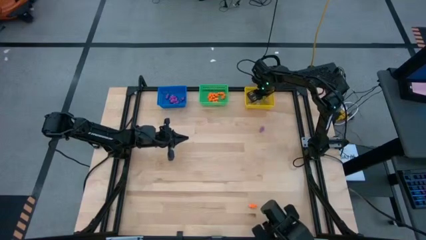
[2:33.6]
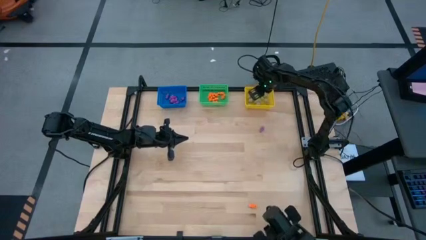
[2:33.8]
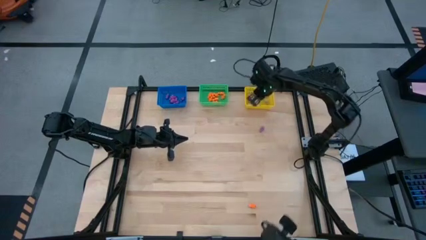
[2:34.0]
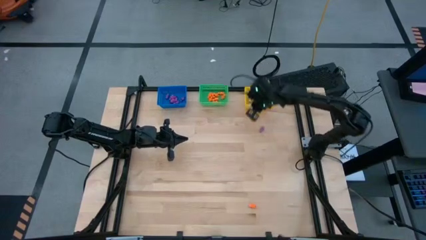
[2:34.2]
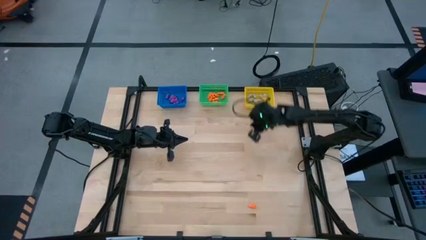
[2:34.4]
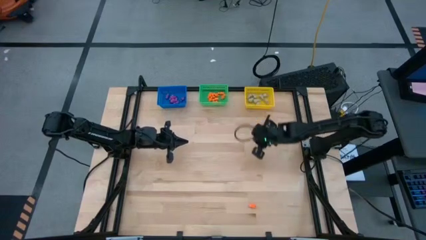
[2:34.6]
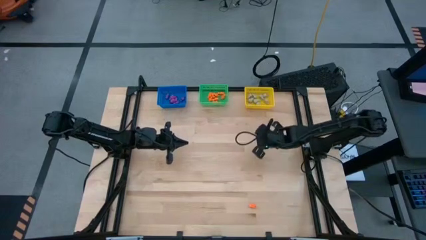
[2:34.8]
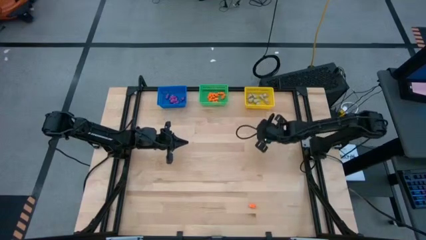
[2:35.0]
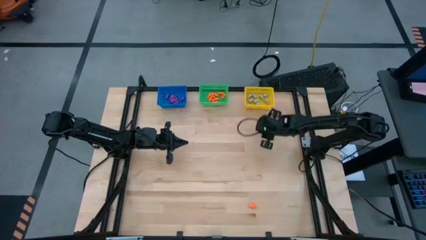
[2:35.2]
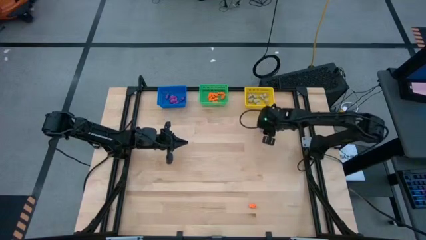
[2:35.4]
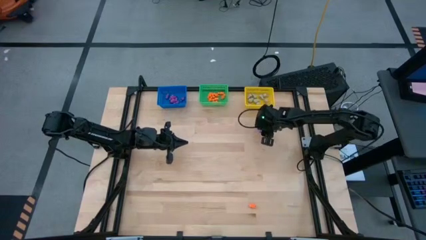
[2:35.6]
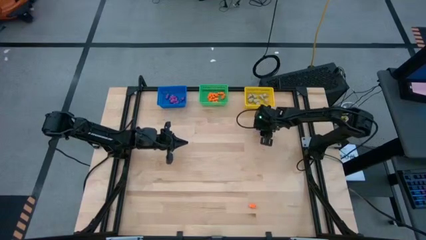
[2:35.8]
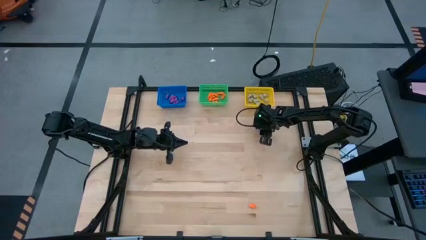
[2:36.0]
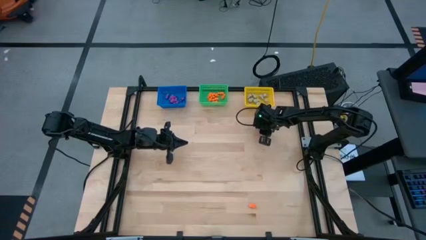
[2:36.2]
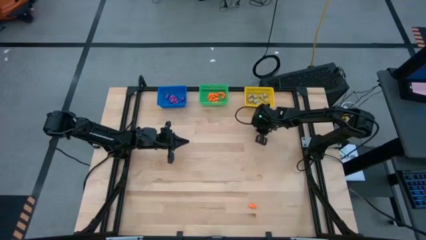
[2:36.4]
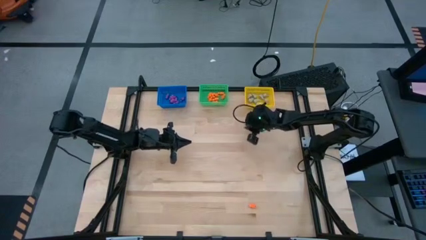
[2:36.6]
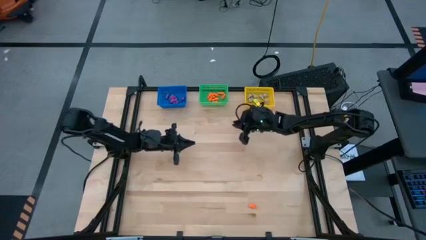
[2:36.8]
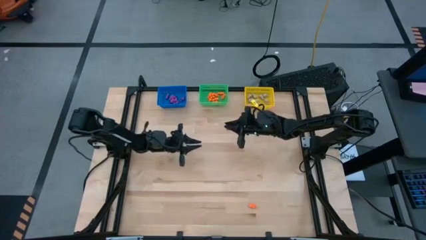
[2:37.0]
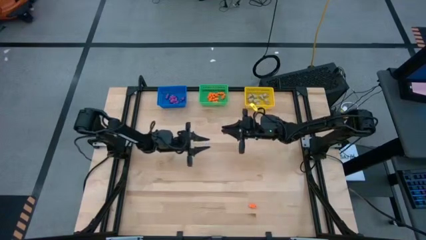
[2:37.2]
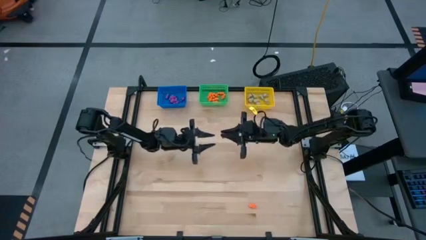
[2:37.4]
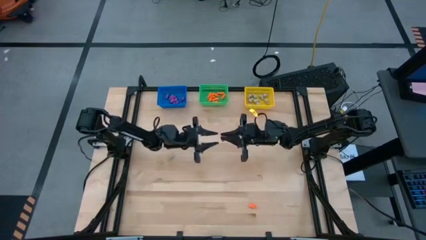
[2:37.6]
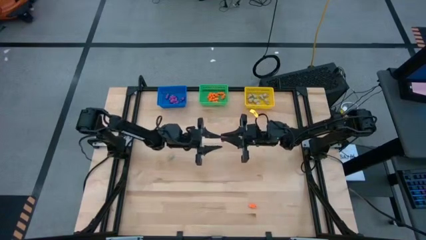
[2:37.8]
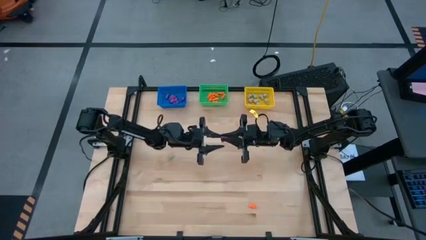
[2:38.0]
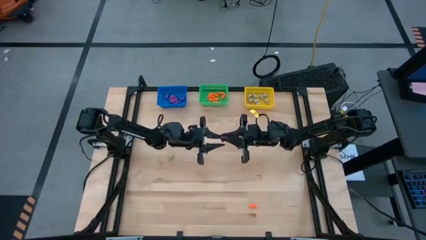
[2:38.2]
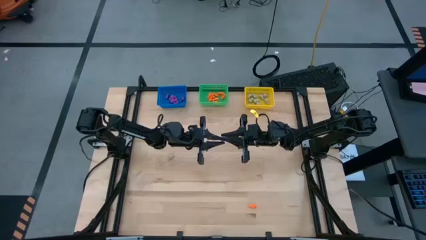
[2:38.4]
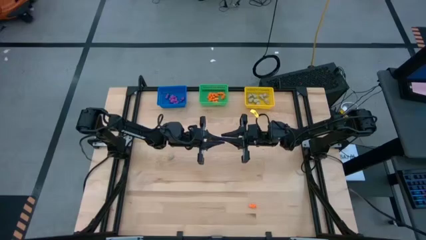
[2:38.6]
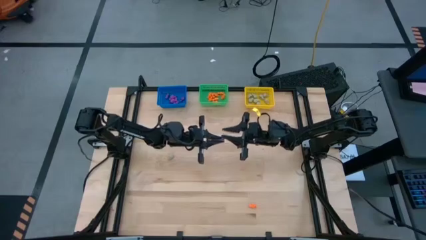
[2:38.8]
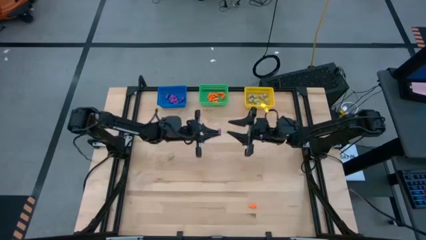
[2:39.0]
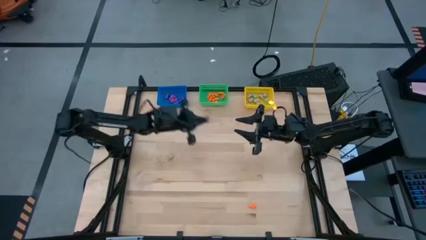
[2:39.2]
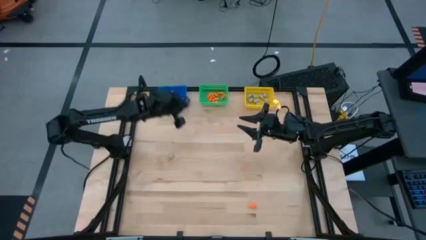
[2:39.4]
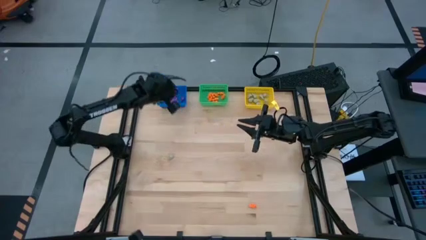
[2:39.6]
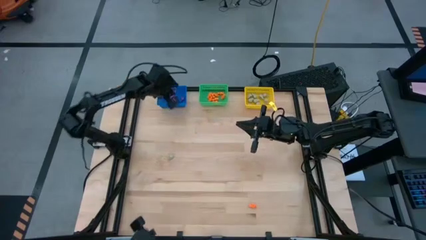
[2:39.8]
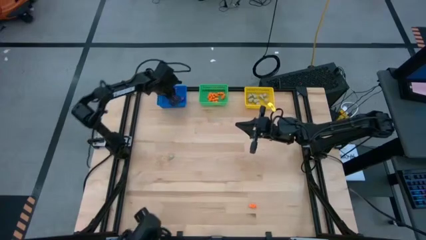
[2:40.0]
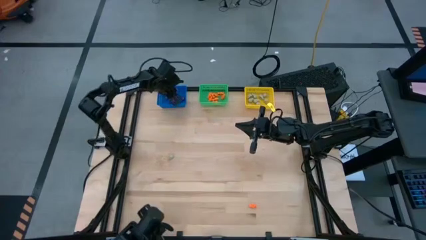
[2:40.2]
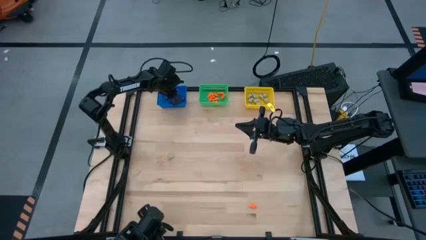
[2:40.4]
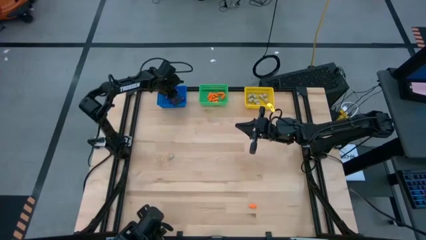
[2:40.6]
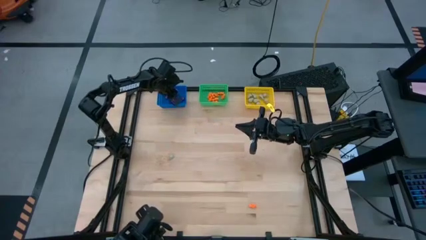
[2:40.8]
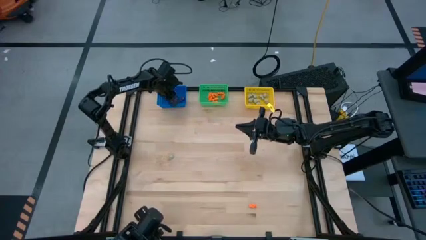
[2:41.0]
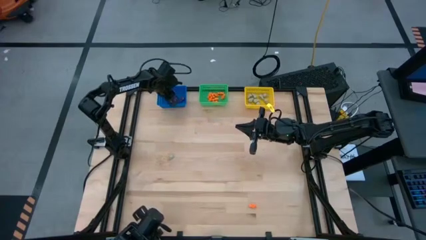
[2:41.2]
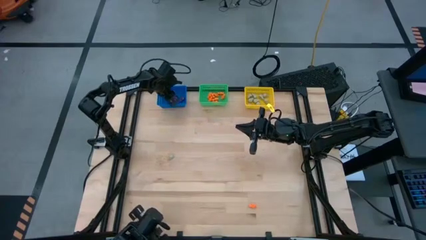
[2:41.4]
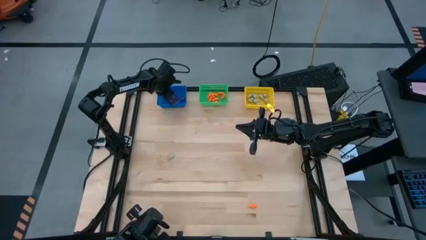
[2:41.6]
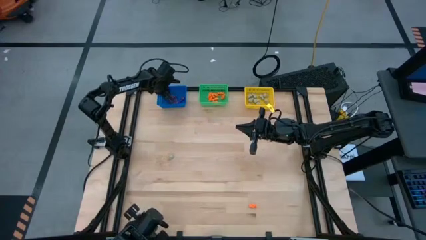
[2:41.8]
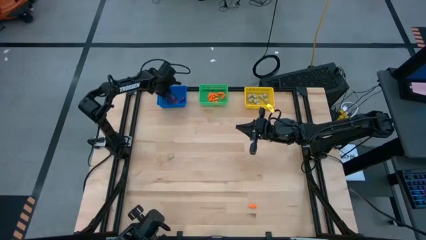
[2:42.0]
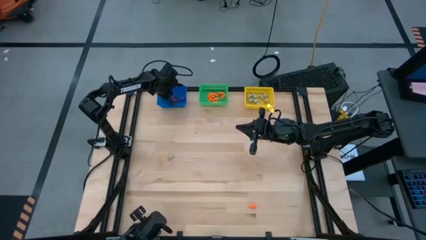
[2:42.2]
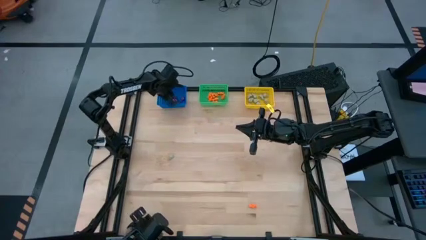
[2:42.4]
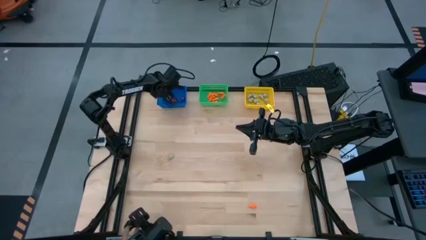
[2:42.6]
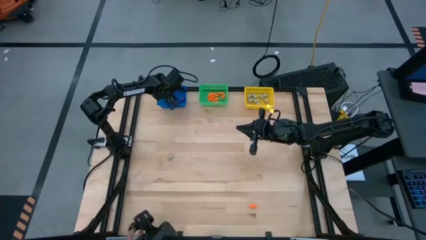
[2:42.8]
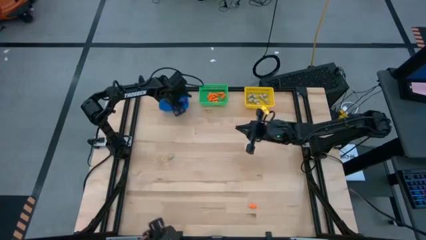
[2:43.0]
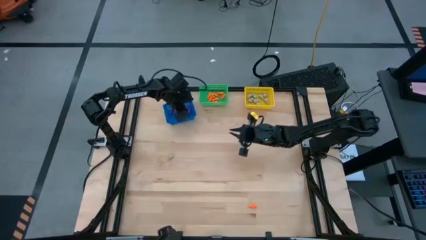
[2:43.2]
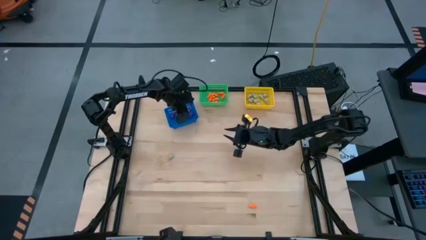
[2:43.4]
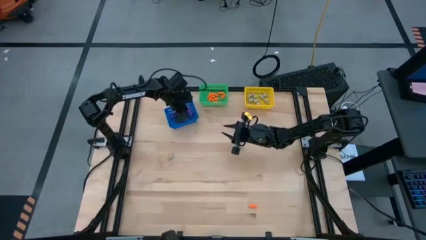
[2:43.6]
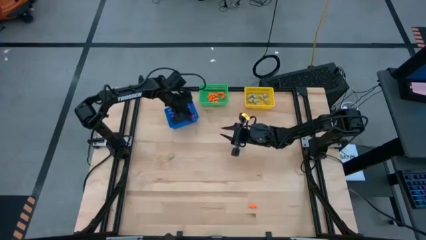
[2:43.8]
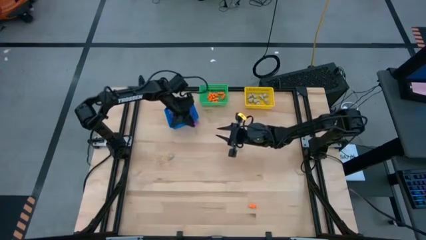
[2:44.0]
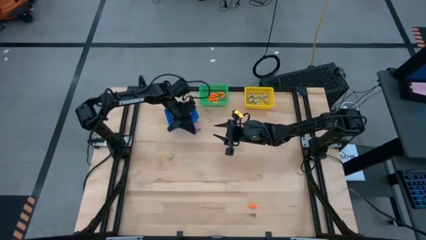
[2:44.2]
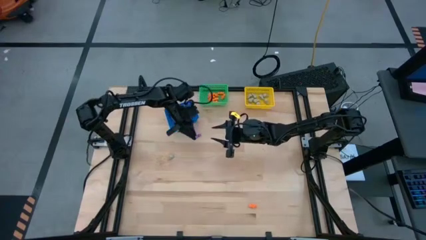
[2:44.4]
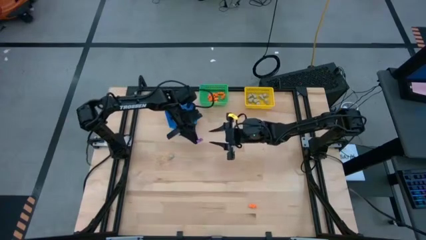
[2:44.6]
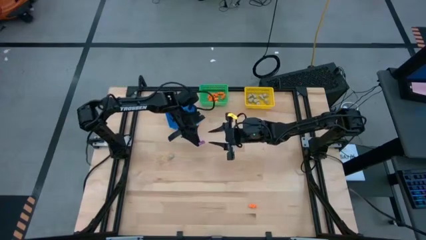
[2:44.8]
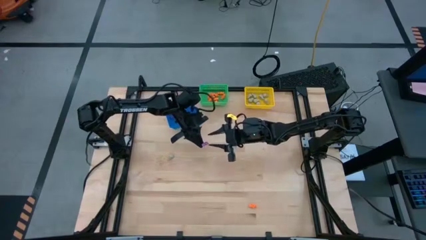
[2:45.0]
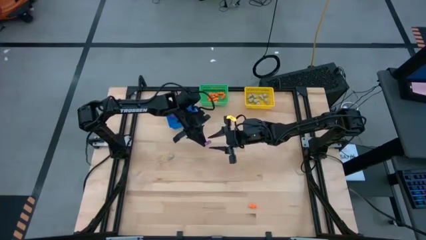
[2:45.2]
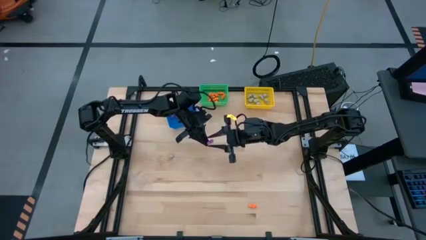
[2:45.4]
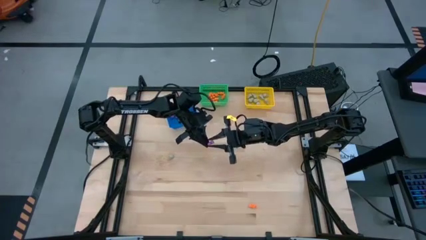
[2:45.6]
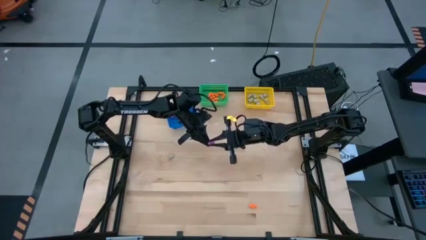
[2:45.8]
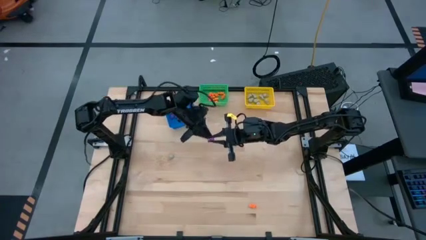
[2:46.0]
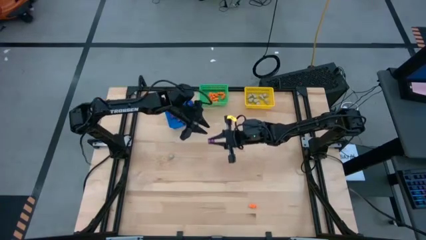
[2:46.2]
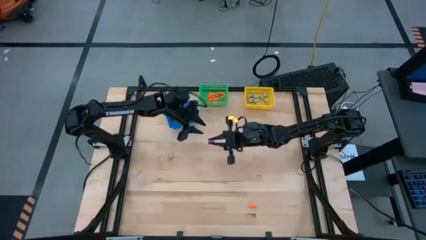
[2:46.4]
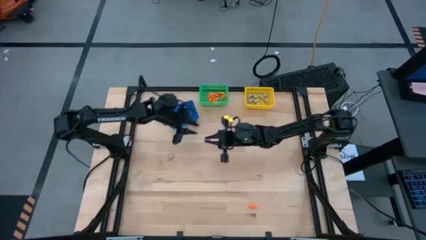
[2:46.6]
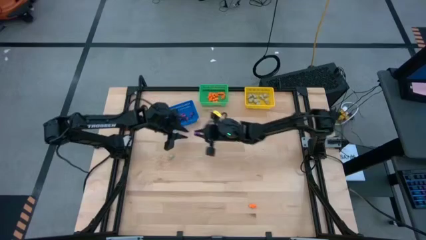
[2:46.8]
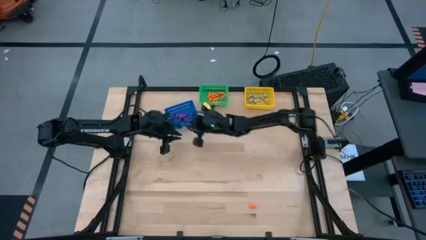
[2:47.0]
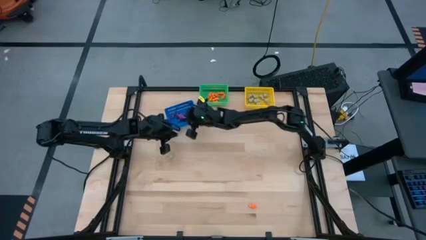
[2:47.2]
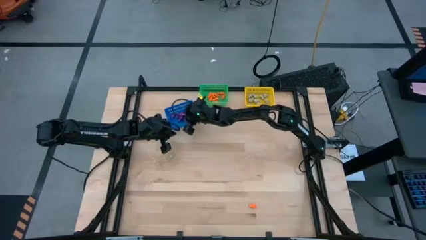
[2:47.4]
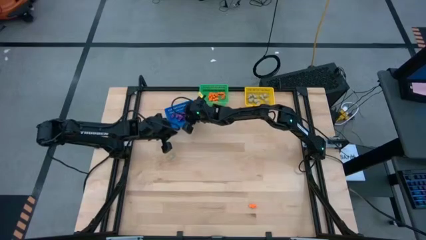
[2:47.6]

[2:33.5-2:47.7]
Task: Sort Halloween decoration
Put the purple skeleton toy into the blue basket

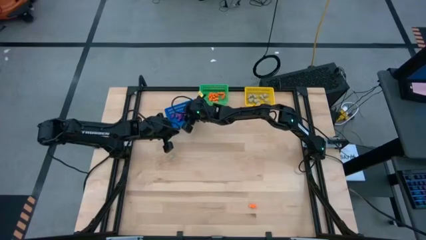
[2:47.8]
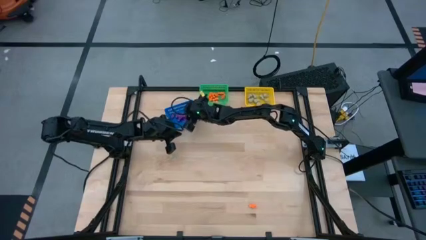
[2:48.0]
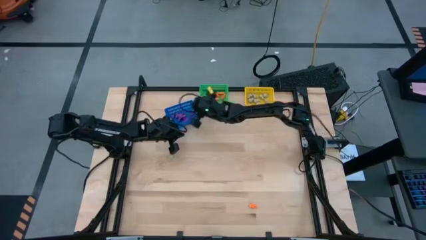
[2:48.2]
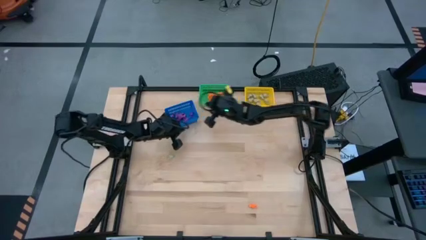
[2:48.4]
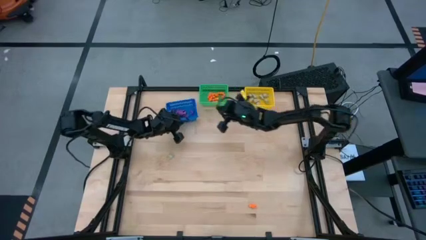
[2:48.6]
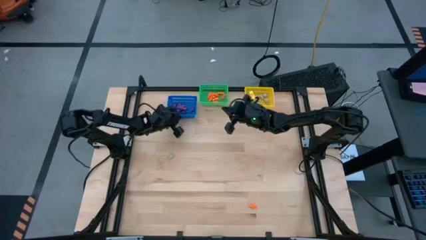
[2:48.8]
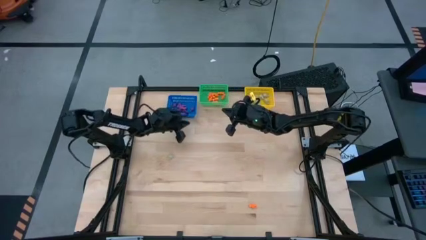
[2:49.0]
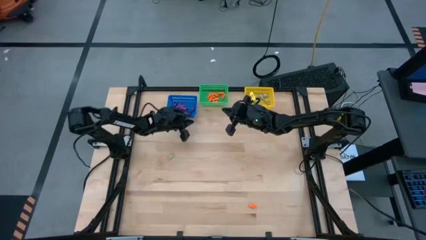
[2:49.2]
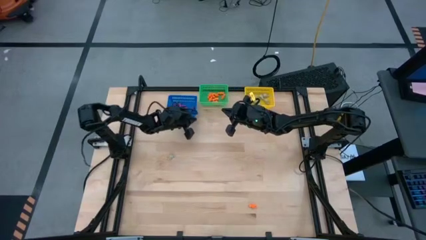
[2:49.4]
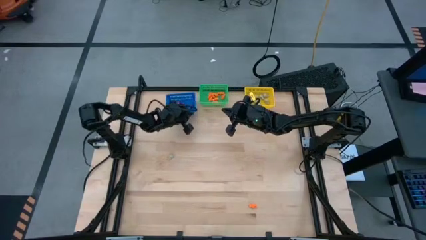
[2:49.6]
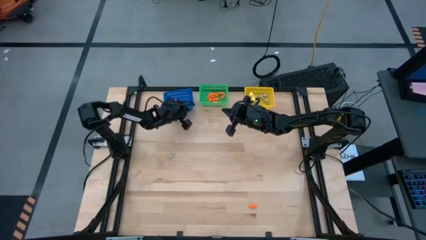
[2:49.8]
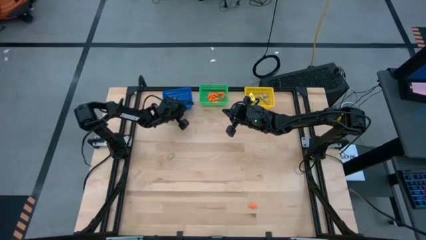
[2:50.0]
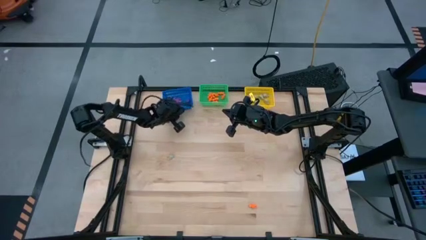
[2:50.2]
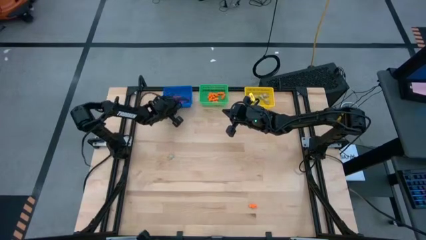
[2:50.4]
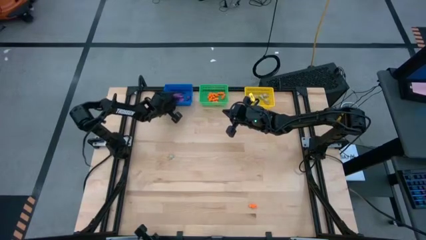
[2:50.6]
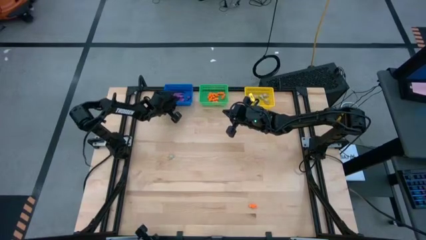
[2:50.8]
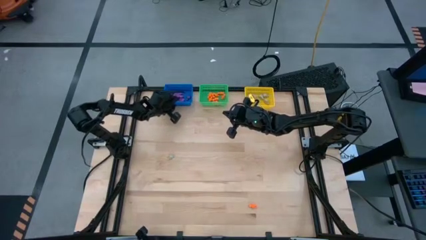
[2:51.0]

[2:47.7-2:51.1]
Adjust the blue basket to the top left of the table
